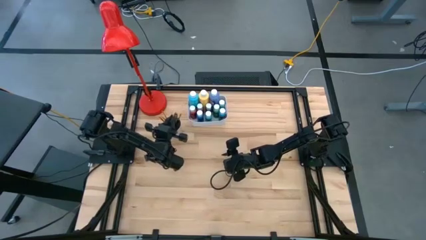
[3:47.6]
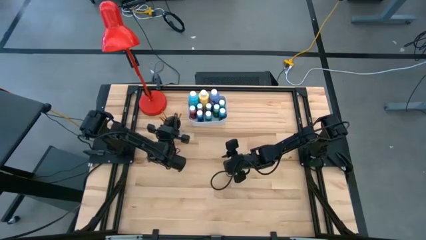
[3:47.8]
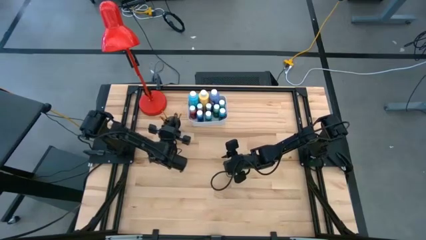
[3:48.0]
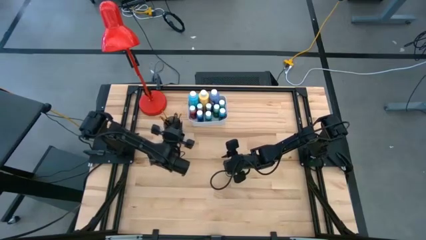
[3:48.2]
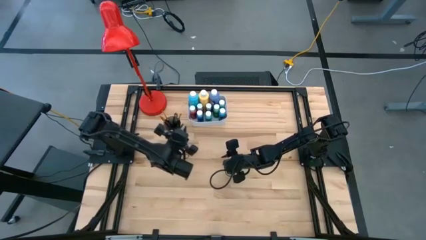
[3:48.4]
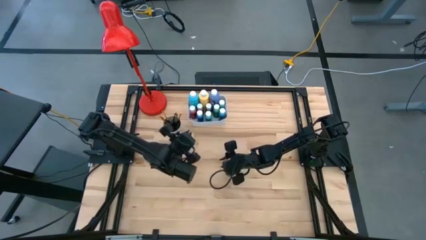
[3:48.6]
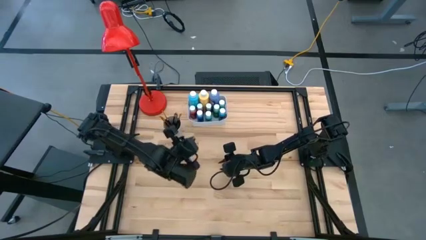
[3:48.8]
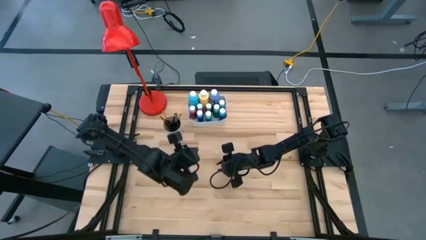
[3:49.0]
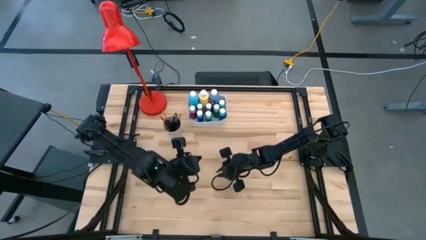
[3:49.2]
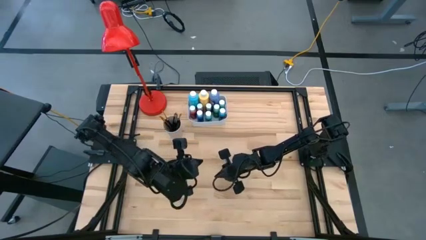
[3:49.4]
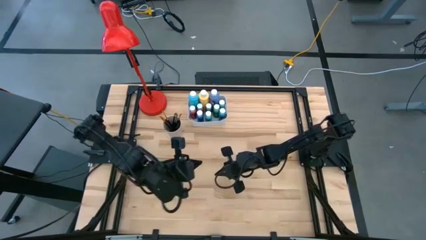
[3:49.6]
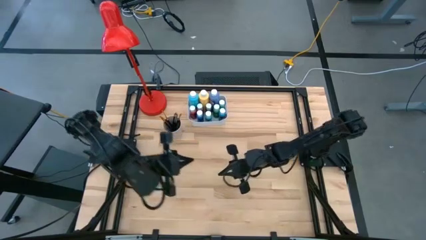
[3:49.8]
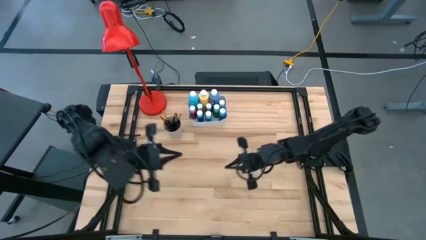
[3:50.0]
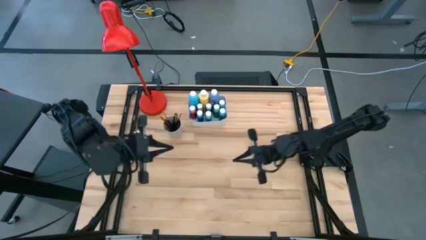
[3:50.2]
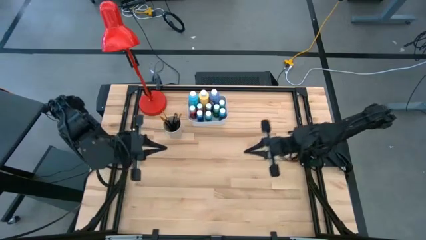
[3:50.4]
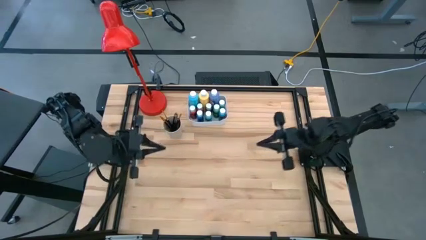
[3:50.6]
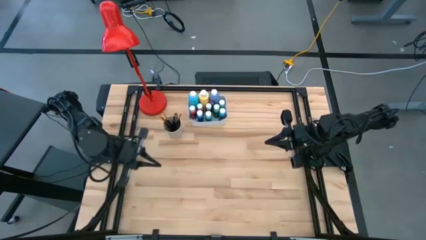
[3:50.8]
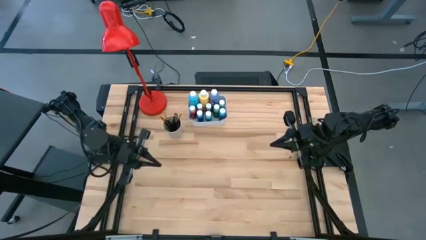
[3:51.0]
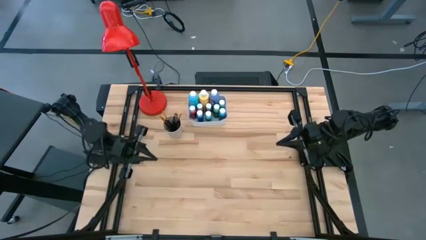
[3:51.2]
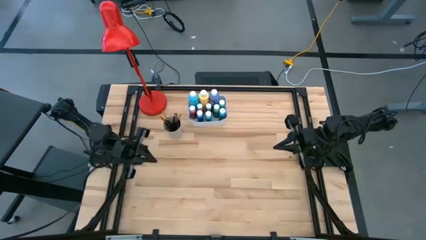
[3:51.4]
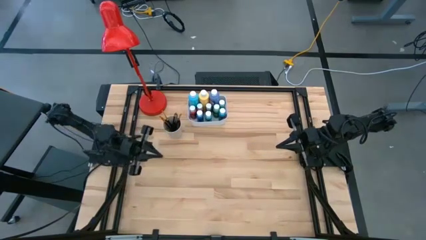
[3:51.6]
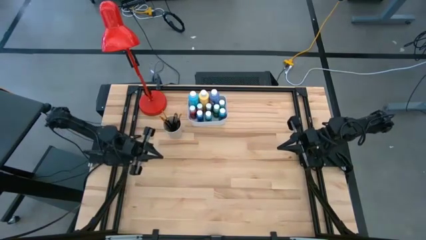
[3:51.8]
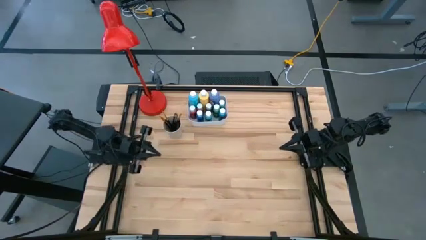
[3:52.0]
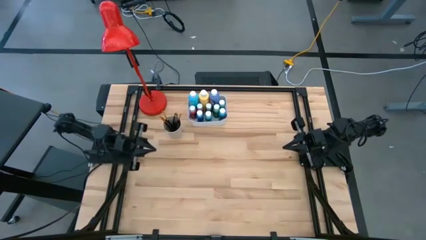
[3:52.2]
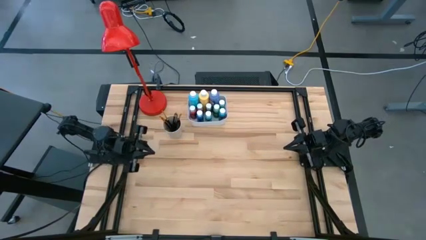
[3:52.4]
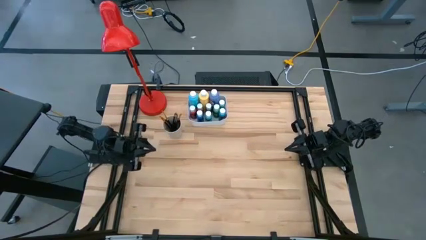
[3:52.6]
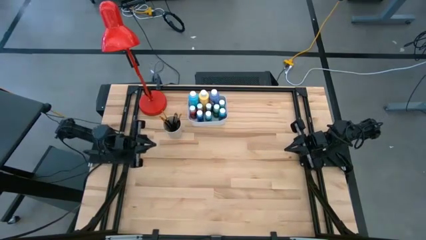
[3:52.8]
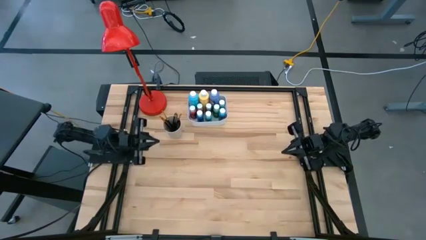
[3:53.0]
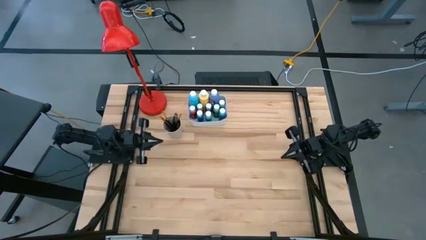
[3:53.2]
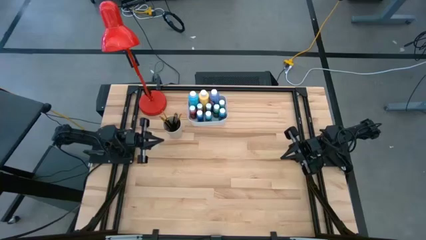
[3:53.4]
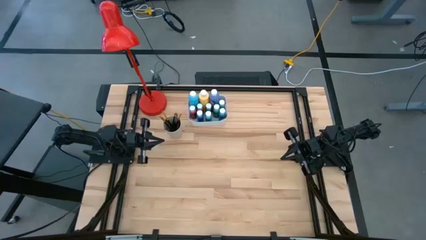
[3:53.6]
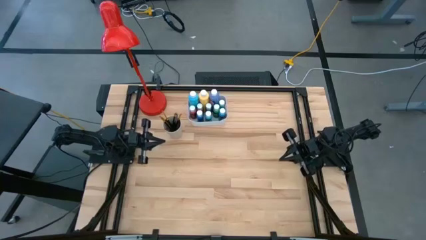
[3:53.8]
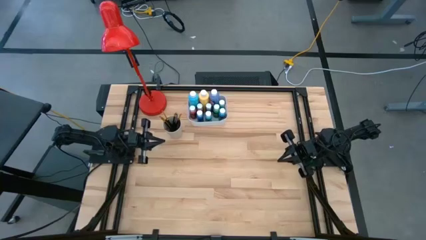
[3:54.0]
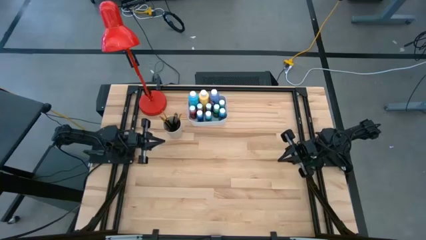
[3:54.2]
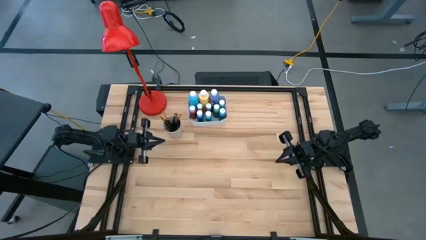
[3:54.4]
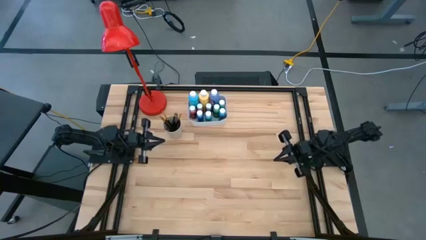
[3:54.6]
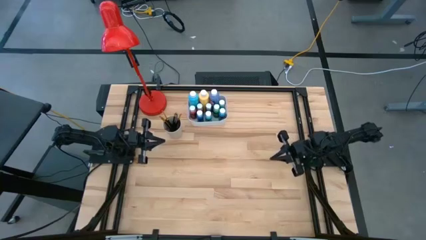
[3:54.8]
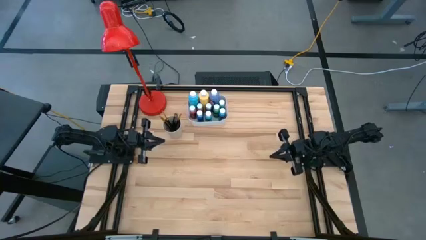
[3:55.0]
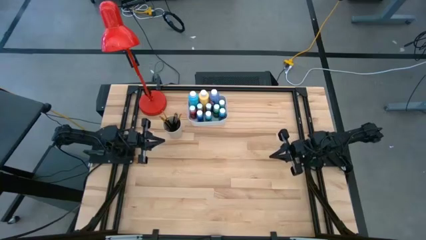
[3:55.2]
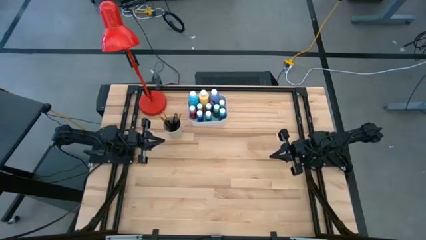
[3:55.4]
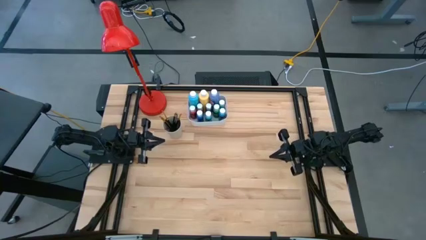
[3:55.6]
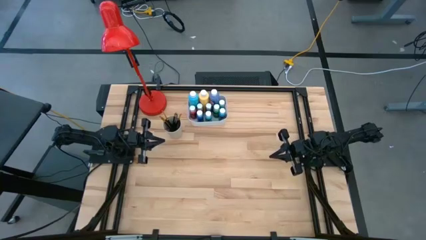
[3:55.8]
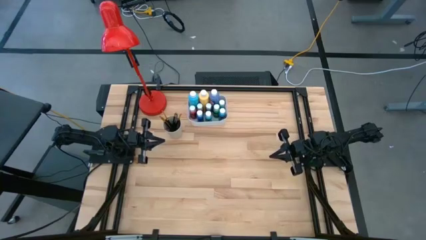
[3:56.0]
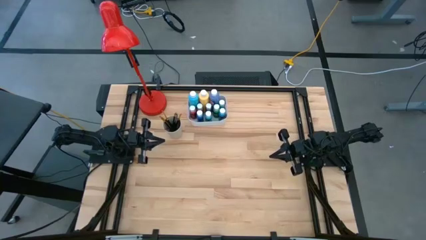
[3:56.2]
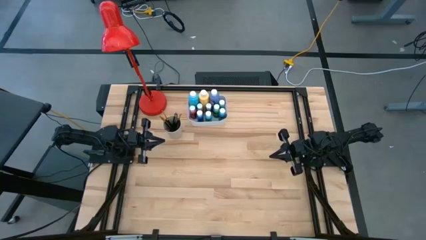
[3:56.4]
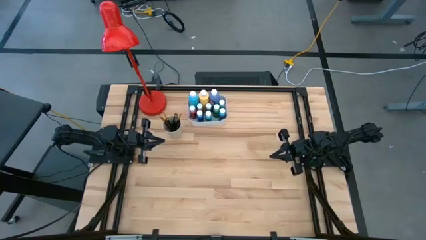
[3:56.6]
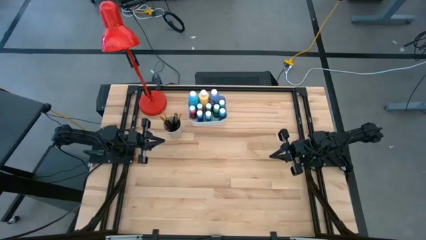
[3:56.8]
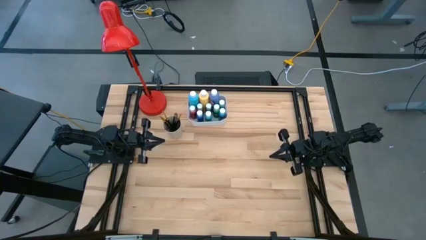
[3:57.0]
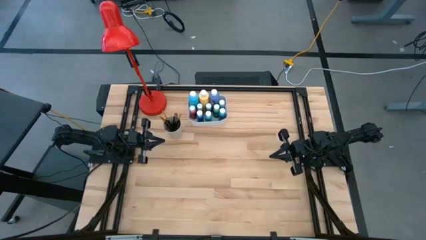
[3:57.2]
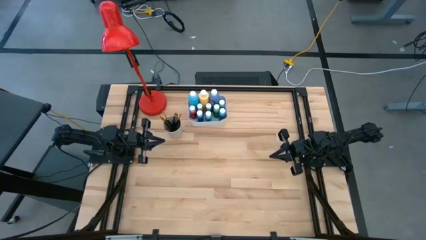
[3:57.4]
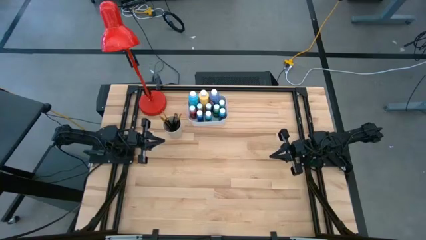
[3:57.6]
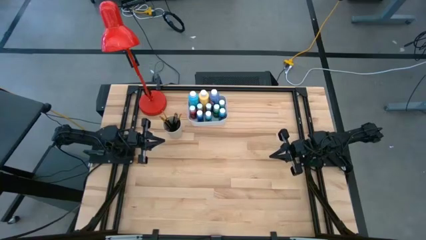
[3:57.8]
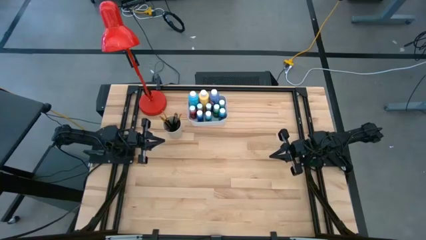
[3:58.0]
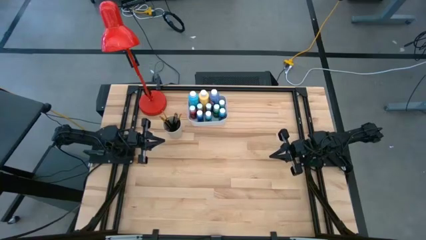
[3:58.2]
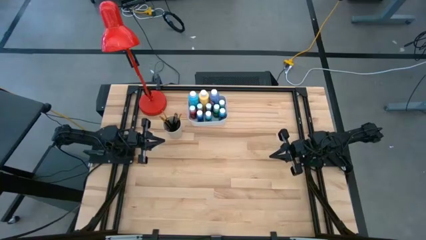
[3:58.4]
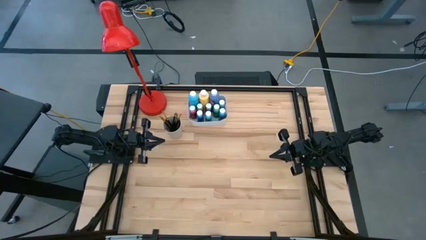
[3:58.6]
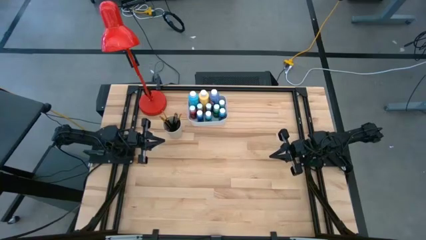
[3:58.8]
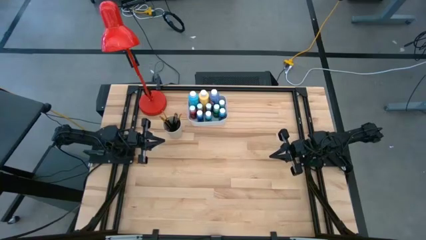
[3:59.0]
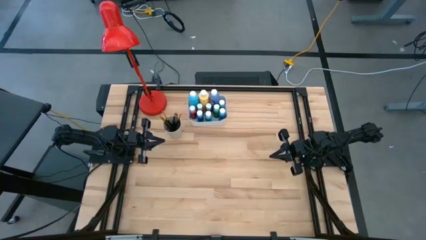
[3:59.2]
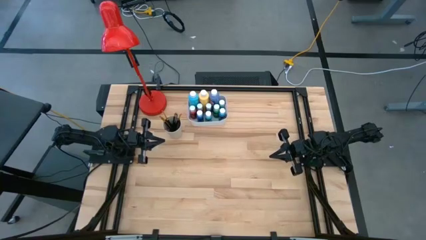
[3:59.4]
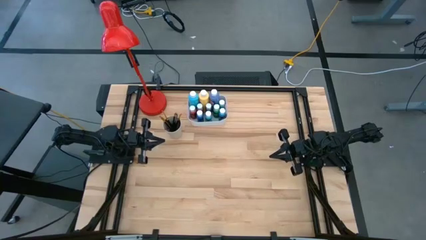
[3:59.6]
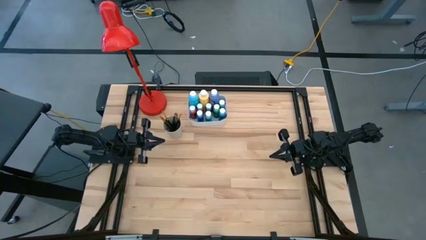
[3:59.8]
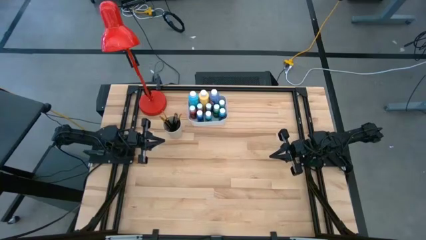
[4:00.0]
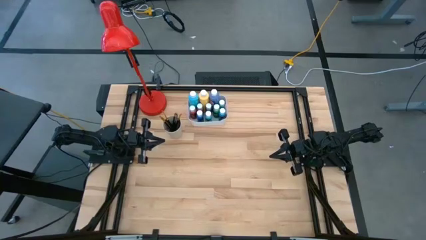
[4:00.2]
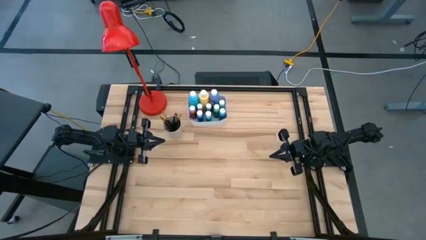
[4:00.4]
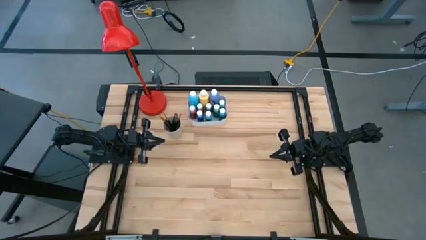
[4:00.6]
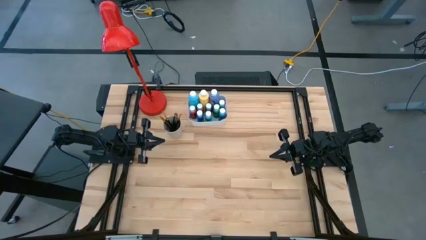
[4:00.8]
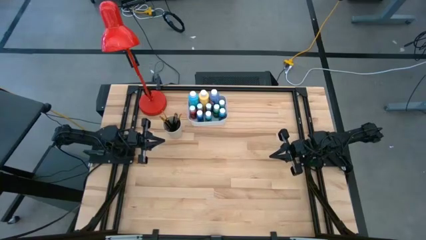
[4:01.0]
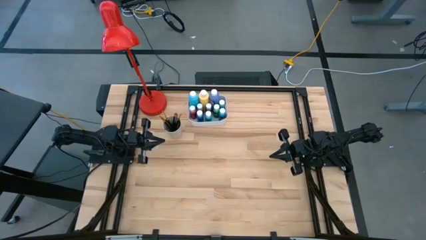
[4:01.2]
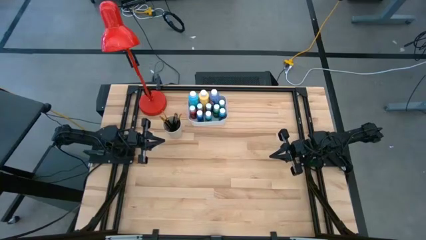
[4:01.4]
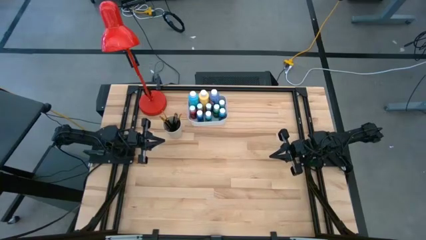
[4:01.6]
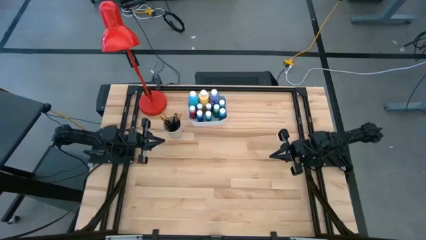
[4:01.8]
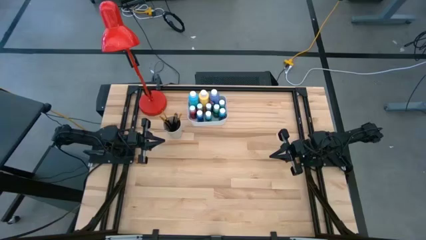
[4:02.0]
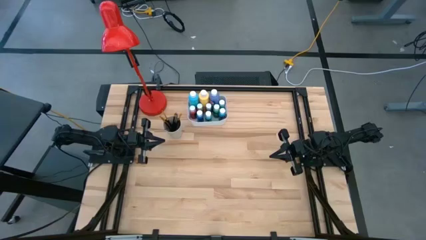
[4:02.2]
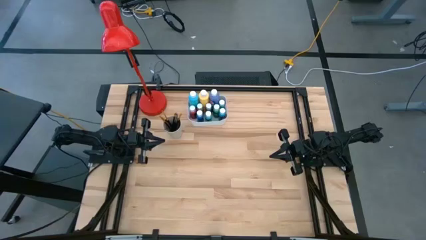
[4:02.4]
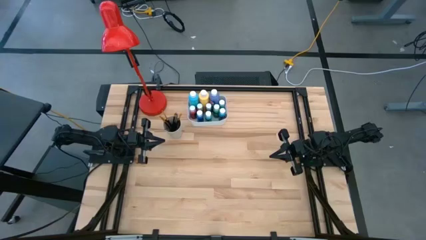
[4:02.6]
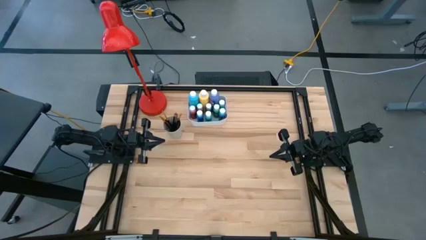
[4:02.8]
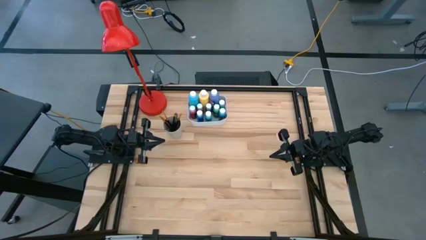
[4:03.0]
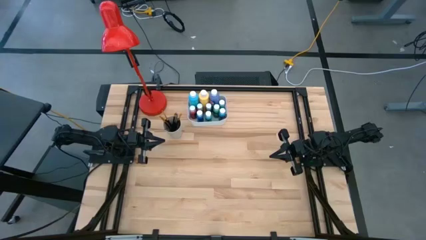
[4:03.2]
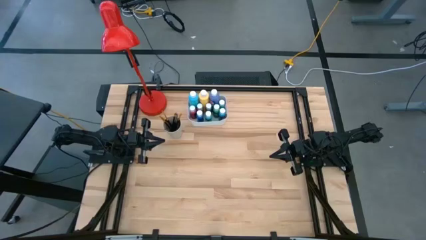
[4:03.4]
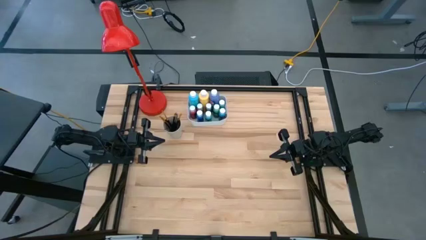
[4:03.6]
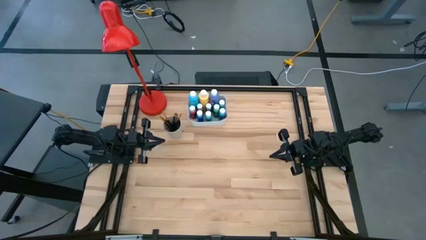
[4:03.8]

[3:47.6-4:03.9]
Task: Pick & Place Paint Supplies
Return to Home Position
